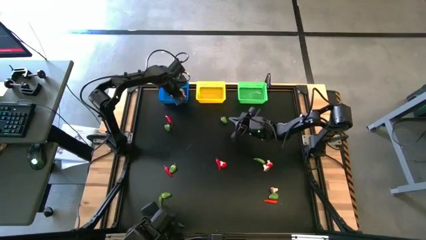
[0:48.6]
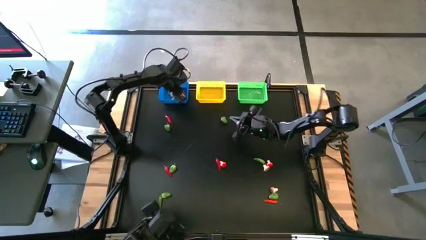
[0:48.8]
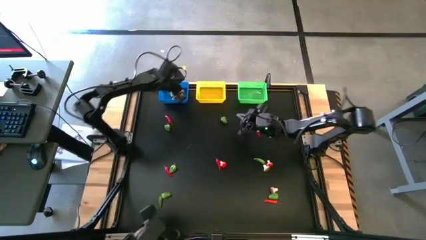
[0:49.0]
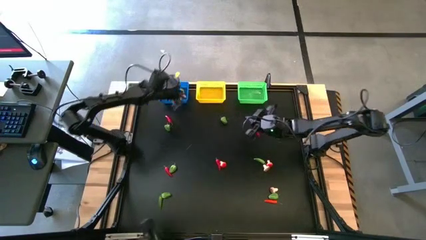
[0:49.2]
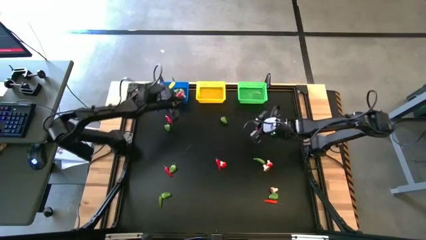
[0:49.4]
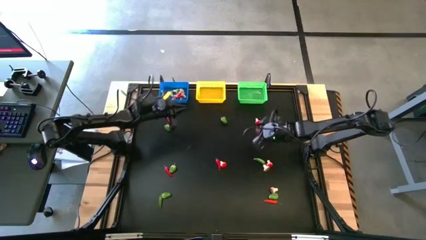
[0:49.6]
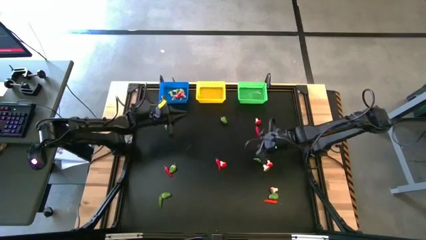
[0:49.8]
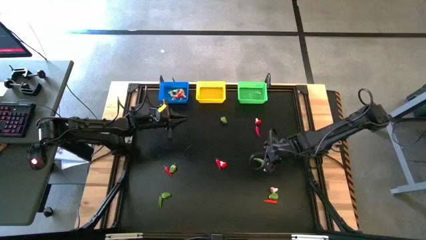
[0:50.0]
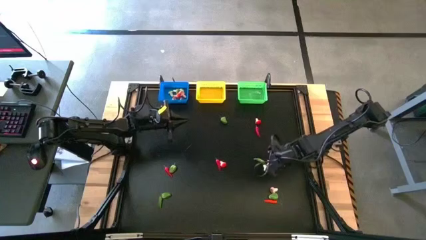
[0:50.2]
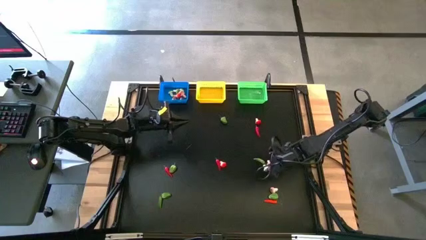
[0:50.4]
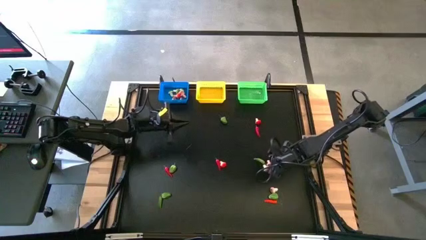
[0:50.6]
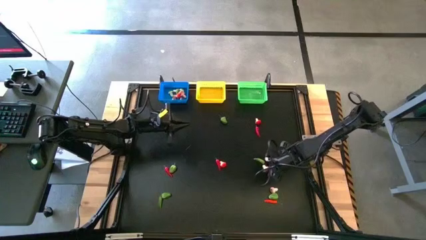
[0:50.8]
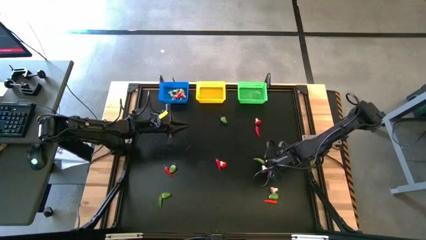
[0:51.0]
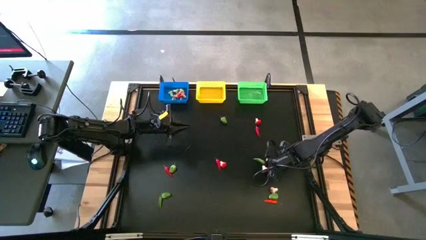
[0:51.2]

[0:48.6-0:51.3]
Task: Sort produce into baskets
Put the red mushroom into the blue bin

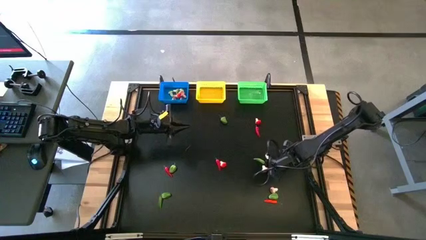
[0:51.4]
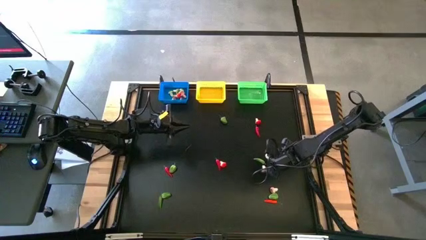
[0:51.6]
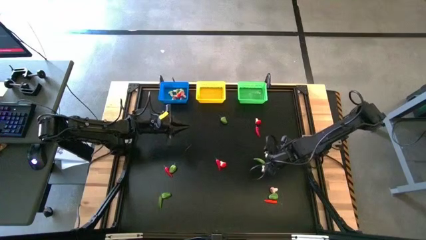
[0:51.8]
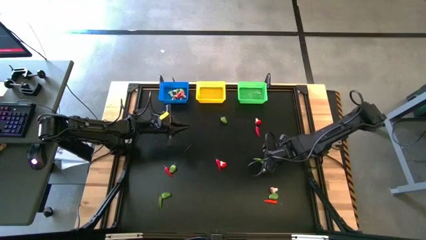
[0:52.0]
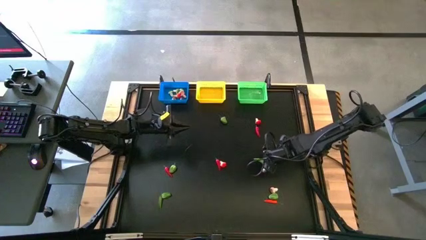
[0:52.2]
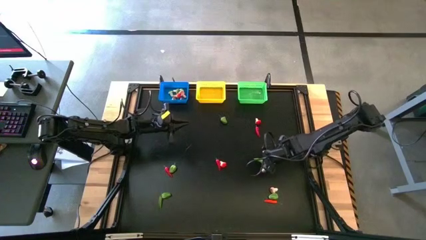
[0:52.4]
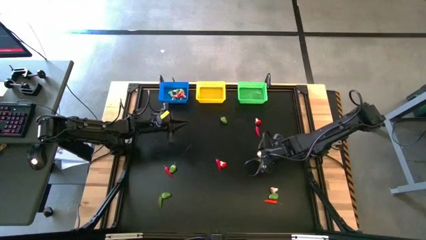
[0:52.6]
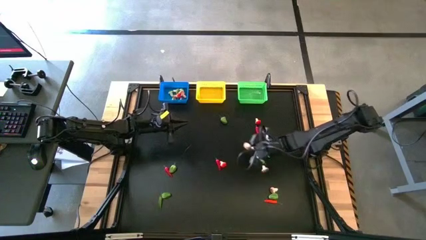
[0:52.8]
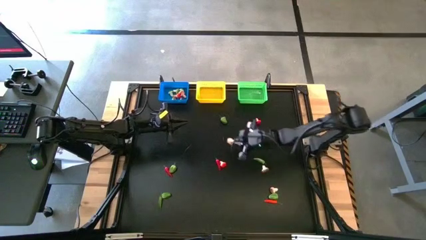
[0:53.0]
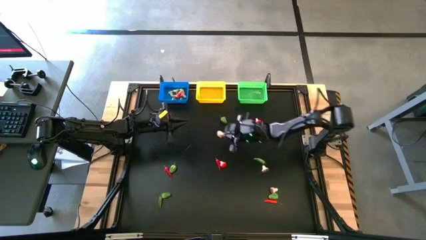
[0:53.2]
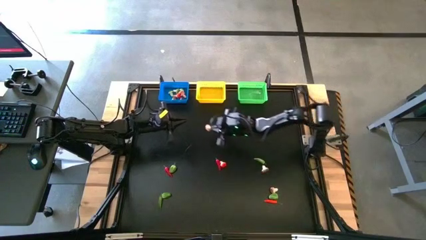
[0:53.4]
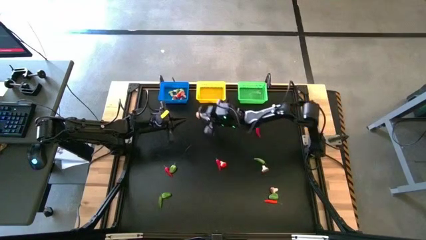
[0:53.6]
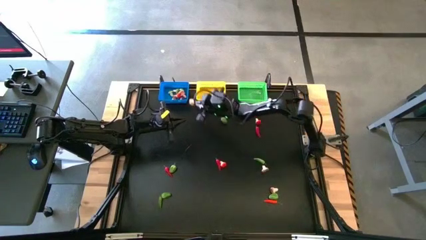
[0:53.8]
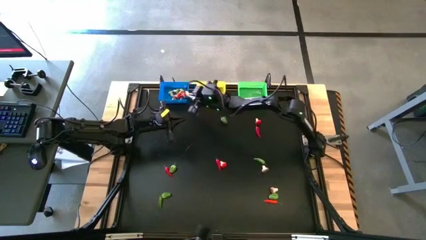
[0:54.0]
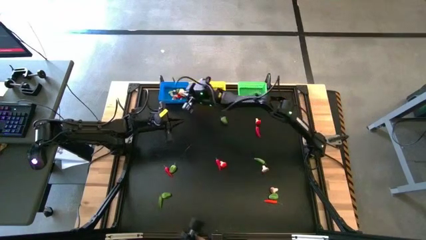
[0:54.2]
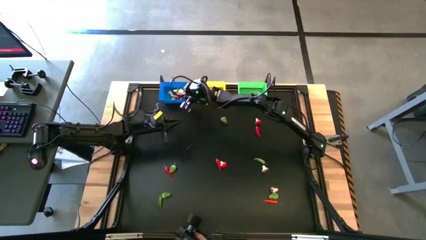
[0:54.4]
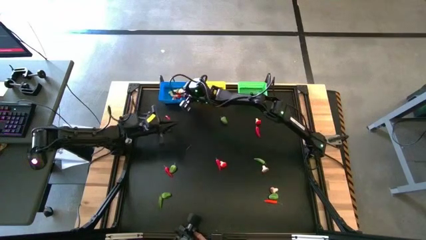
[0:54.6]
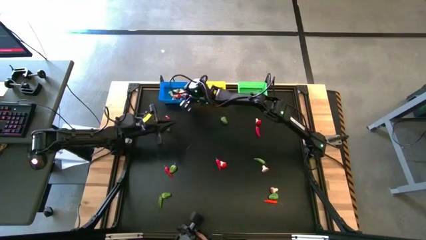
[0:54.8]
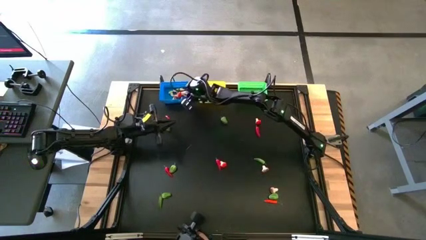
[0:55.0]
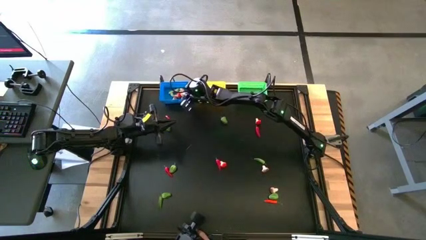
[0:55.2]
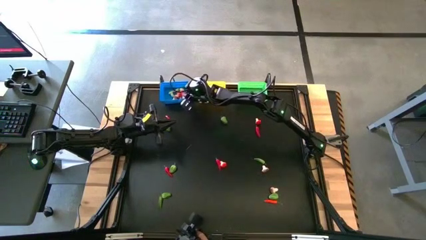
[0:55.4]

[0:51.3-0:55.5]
Put the red mushroom into the blue bin

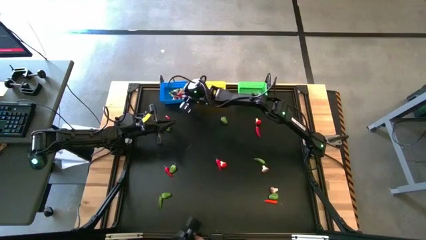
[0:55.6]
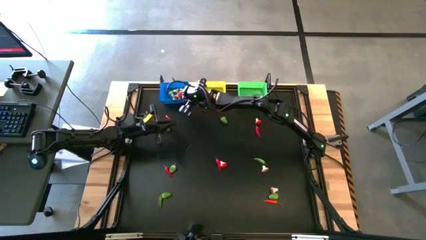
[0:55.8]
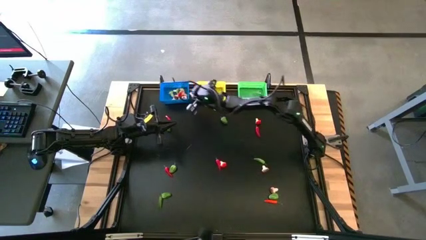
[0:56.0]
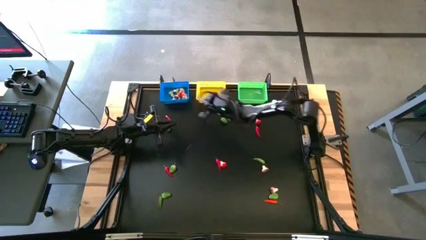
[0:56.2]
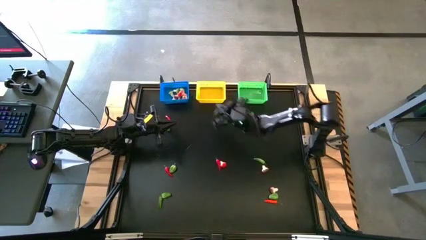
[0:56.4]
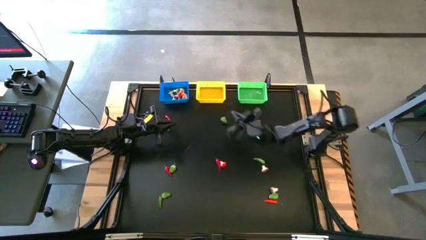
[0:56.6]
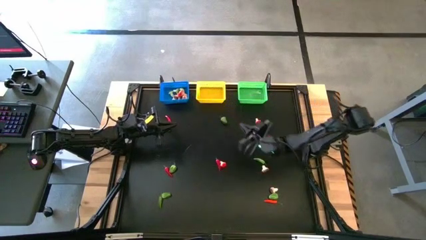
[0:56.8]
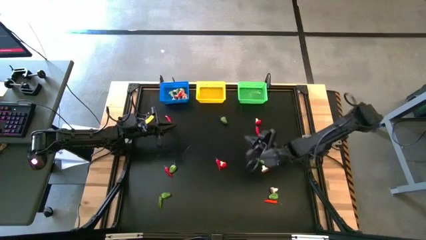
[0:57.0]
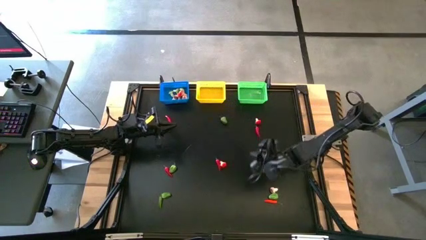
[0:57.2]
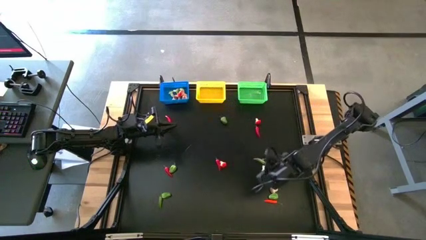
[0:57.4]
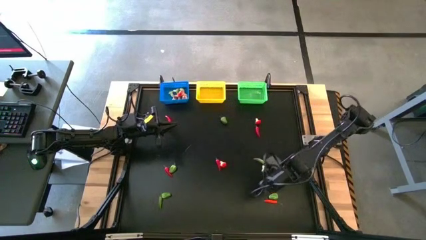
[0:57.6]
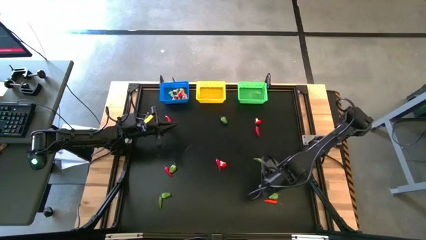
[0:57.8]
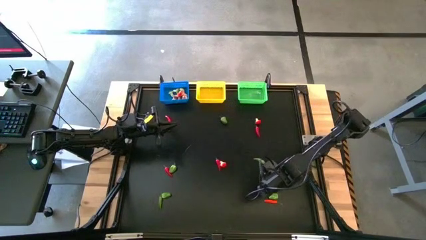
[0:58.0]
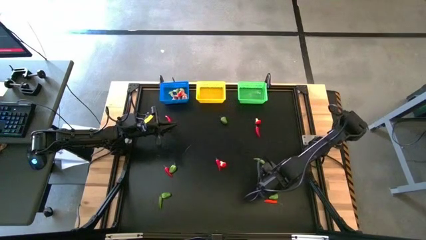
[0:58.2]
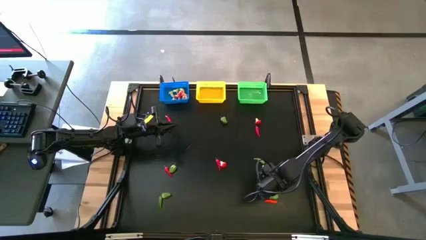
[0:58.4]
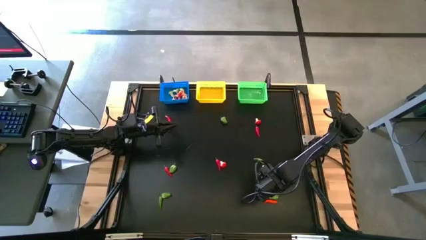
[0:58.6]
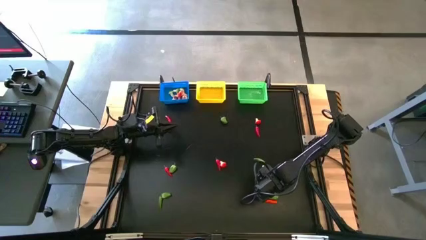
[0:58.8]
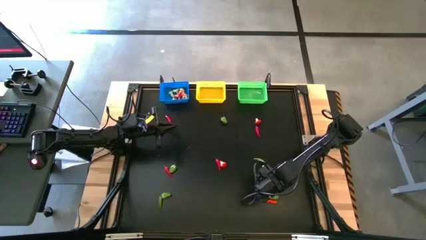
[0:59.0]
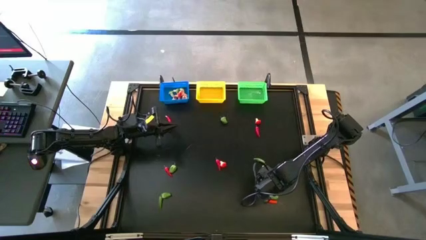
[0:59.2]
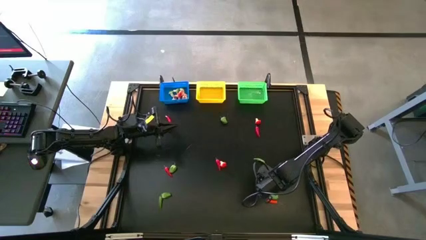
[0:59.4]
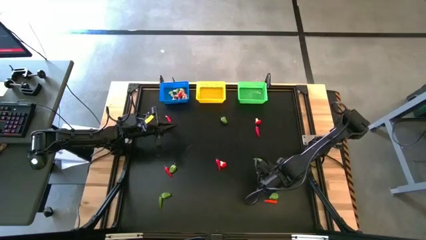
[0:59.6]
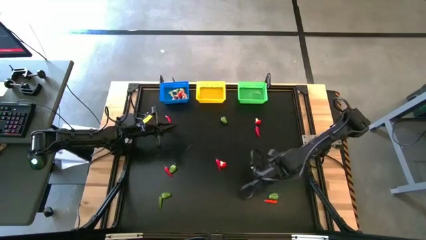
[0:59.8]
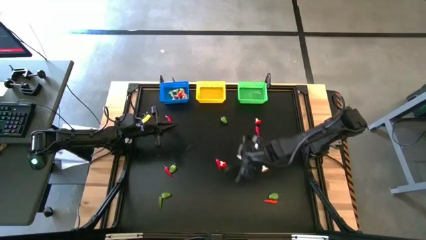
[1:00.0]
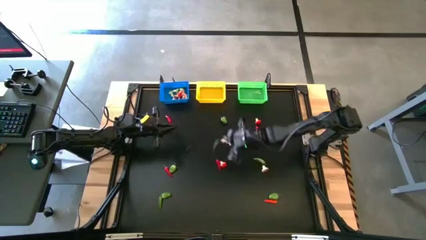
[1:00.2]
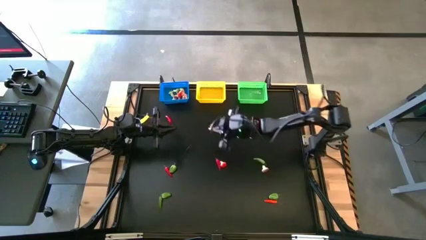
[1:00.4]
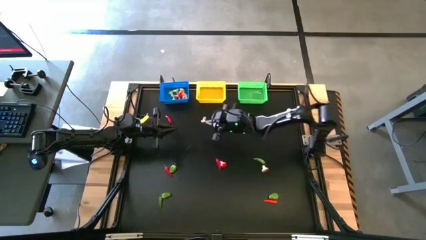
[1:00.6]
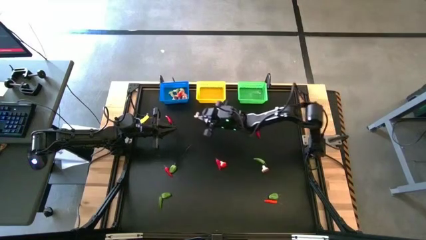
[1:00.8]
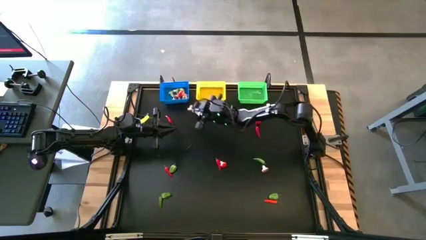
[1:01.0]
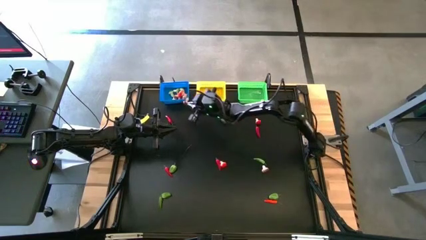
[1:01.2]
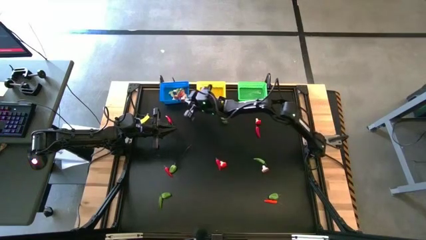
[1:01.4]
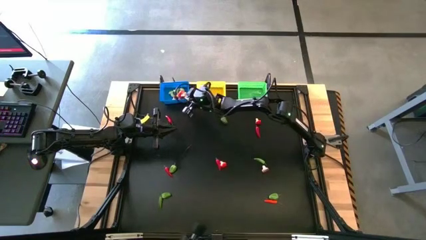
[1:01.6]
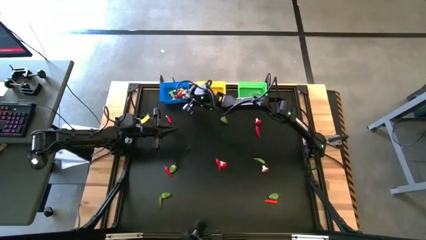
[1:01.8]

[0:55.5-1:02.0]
Put the brown mushroom into the blue bin

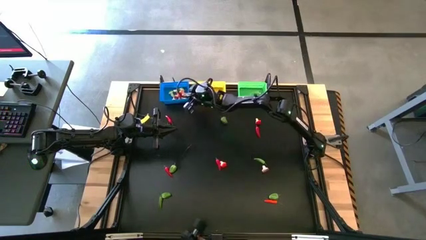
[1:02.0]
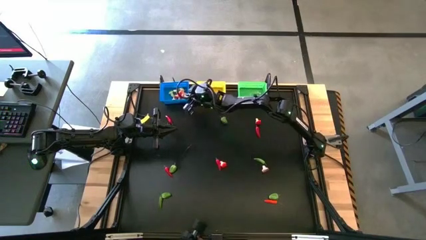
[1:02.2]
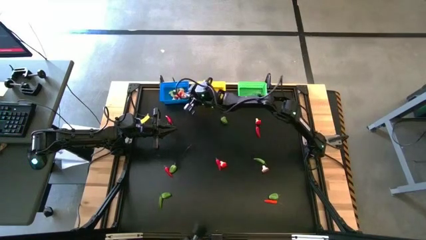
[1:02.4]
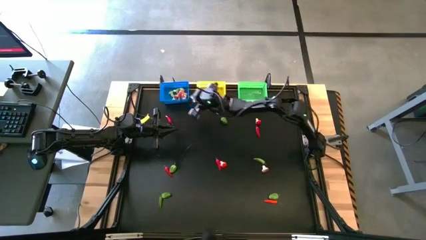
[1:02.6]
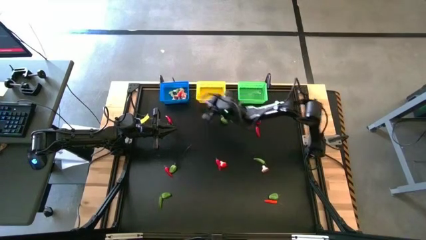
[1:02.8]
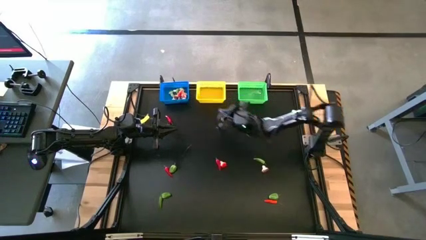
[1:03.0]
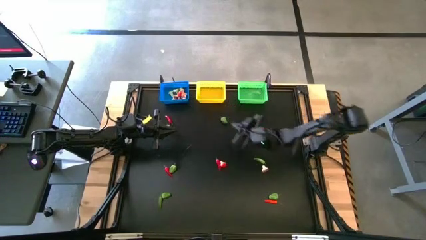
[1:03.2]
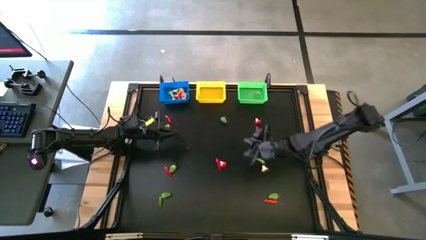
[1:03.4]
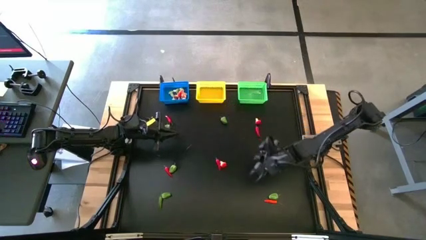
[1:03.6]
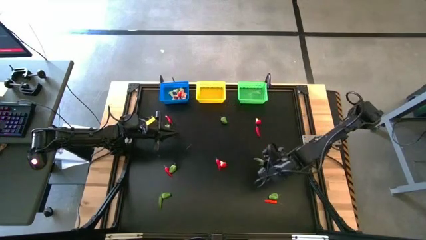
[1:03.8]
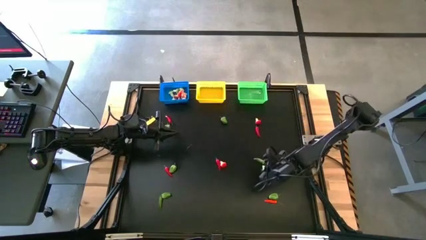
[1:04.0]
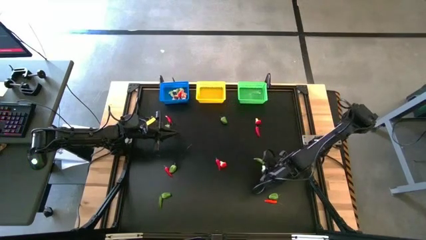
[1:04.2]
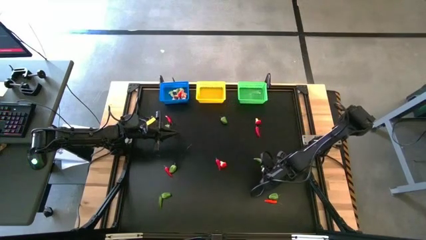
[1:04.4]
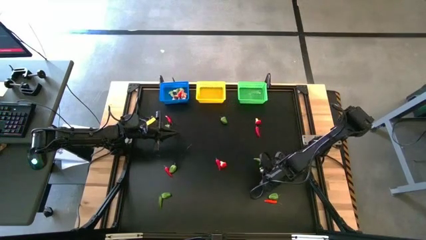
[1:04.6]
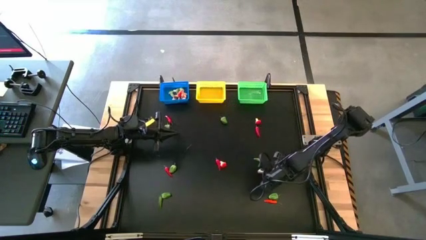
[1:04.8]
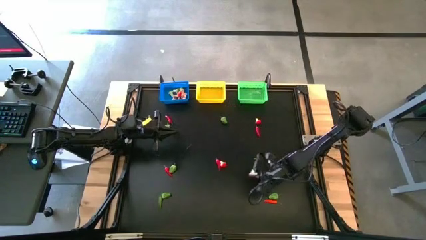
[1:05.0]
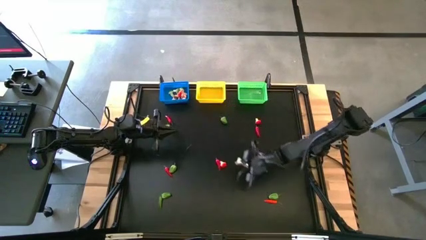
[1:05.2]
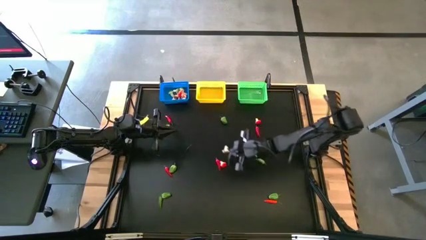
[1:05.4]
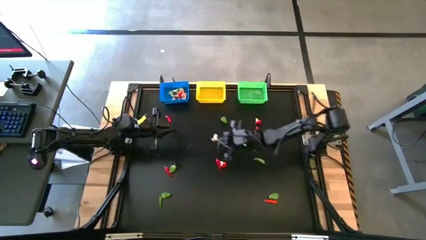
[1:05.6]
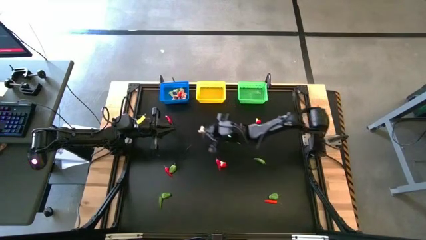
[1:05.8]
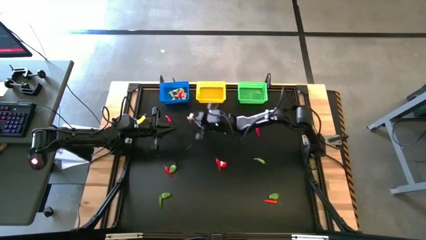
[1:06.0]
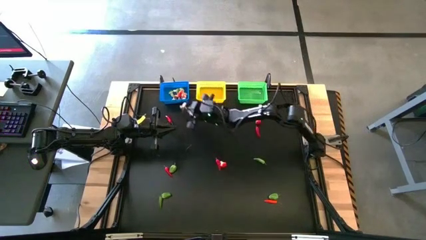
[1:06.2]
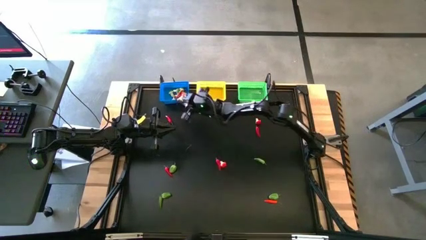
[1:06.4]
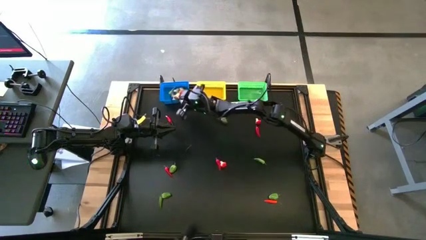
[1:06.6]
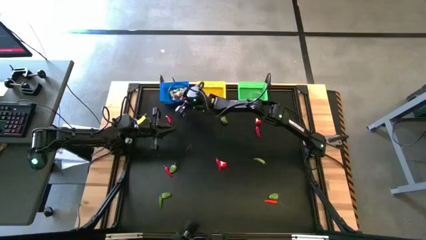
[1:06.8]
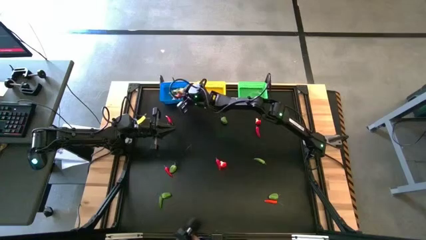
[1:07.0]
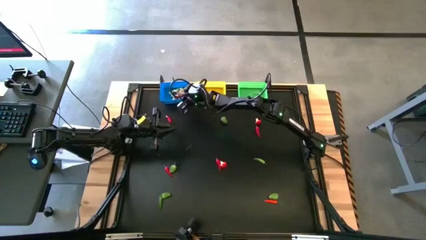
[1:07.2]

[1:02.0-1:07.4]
Put the brown mushroom into the blue bin
